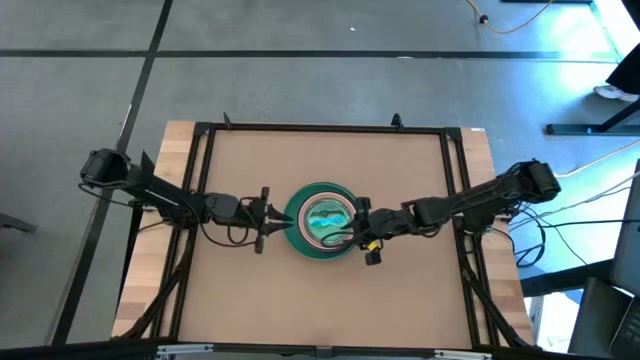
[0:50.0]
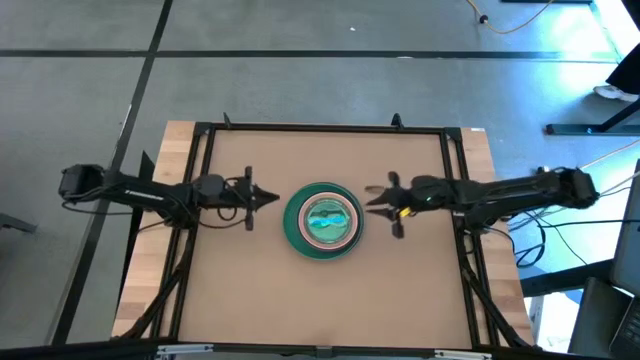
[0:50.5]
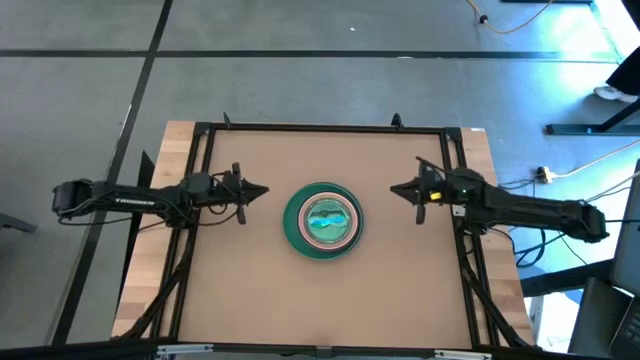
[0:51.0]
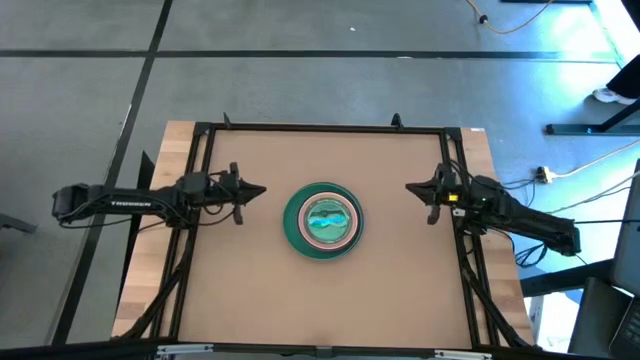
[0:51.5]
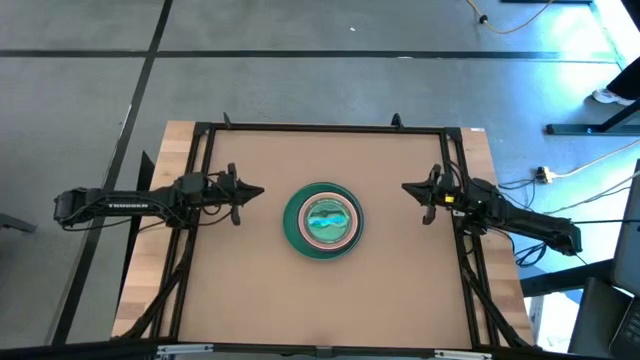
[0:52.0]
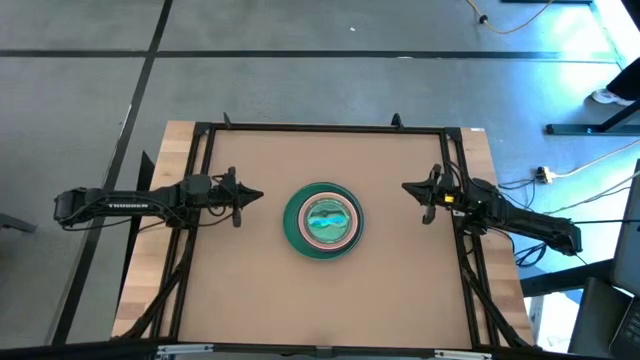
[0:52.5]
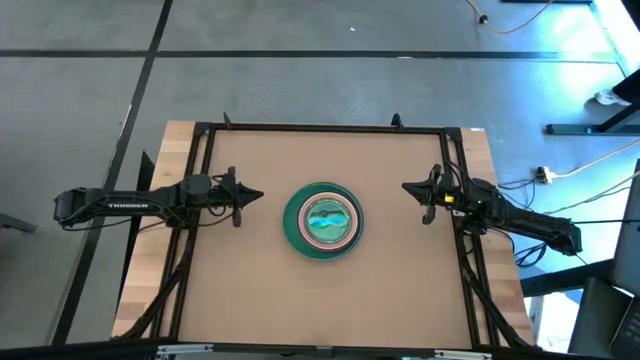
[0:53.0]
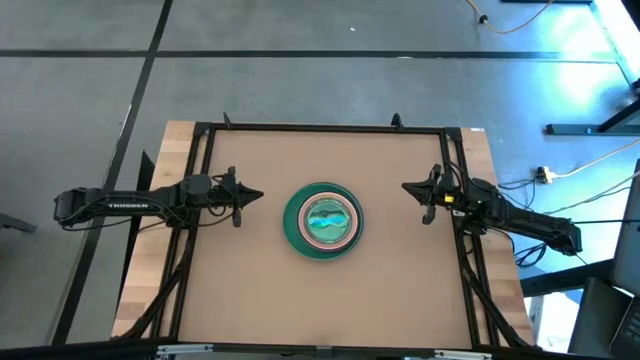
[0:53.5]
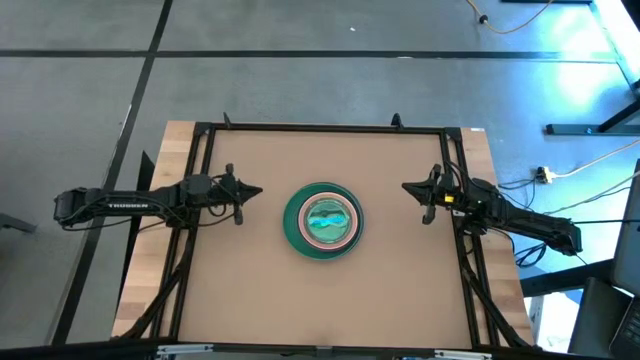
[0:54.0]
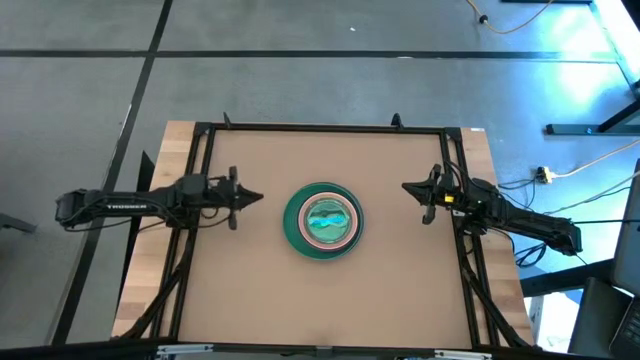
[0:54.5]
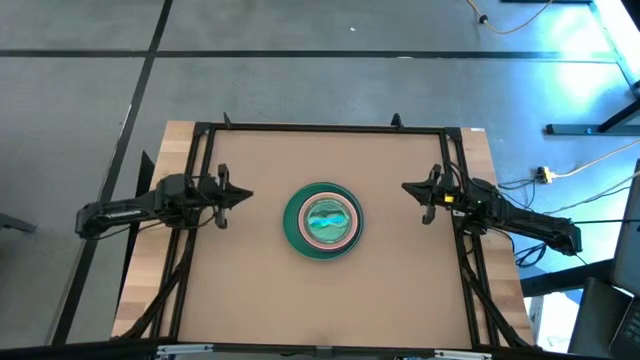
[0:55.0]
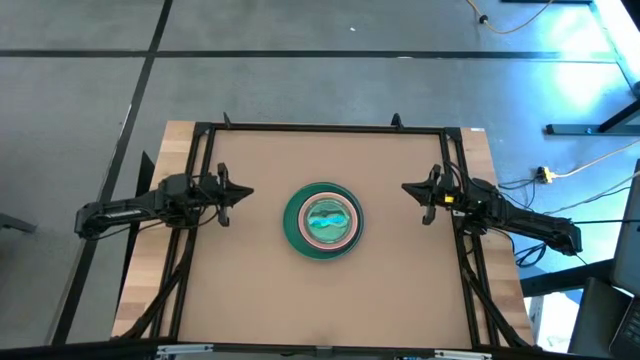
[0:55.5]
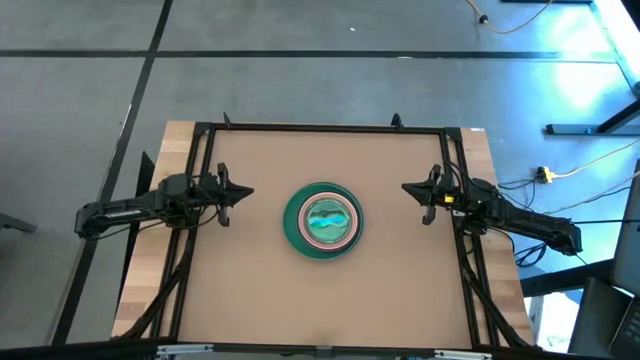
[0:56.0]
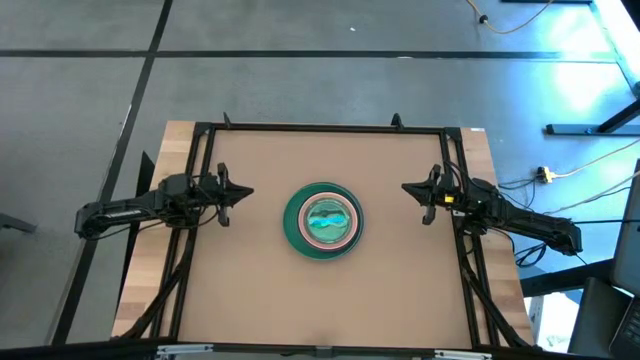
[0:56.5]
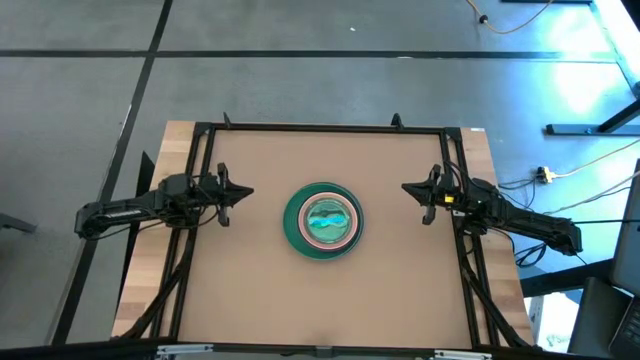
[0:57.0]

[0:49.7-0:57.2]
Task: Stack plastic plates
Return to Home Position

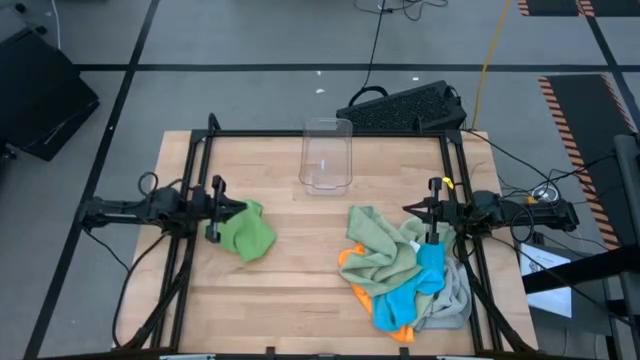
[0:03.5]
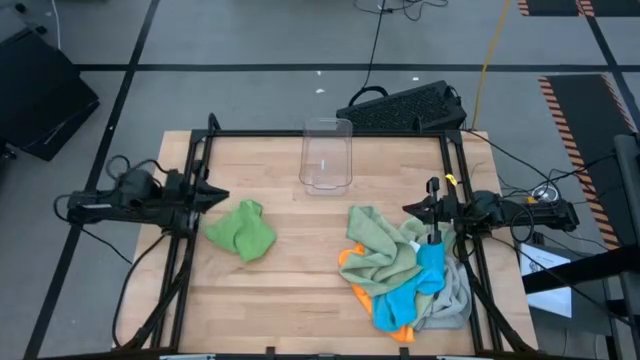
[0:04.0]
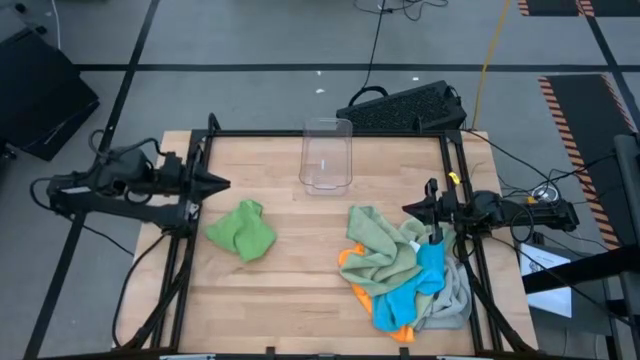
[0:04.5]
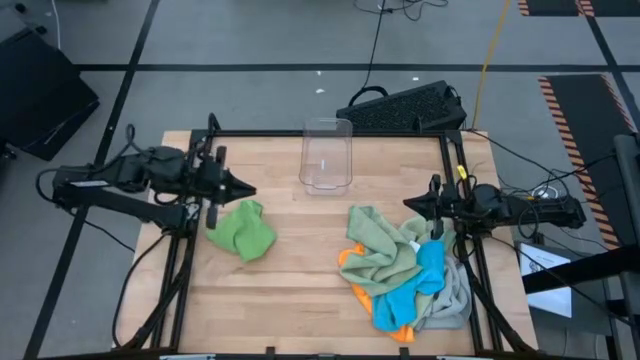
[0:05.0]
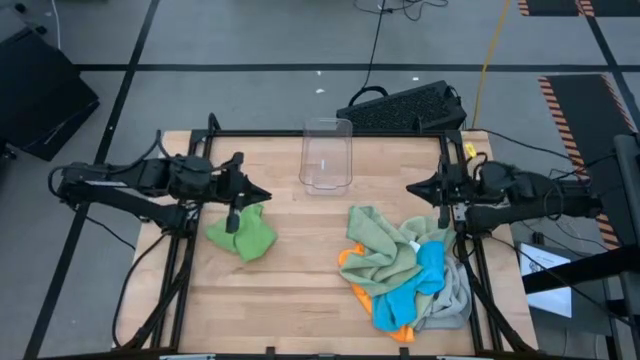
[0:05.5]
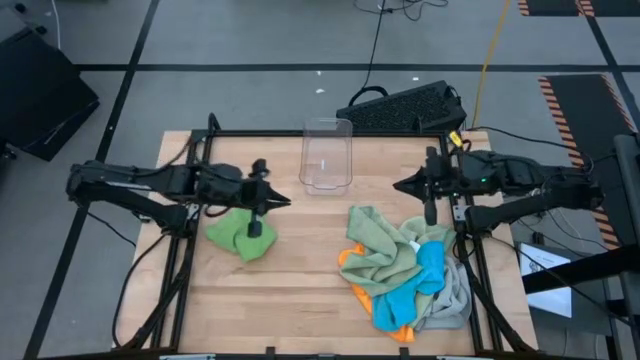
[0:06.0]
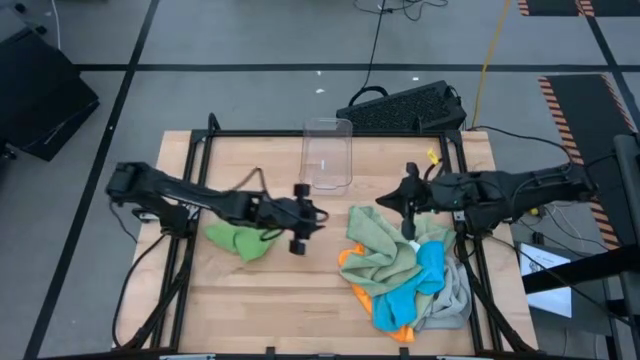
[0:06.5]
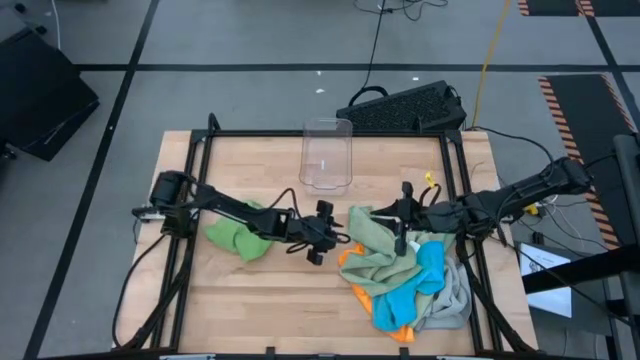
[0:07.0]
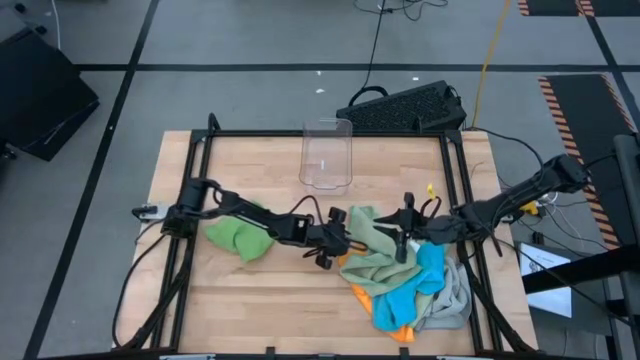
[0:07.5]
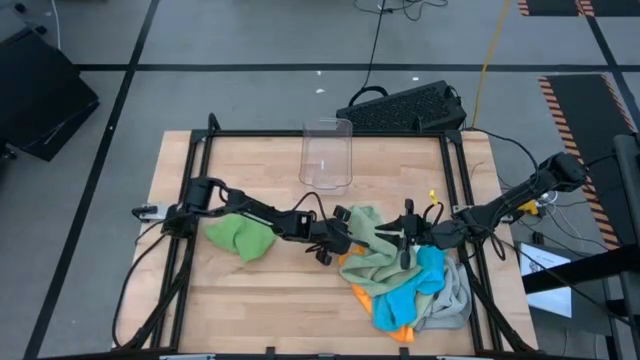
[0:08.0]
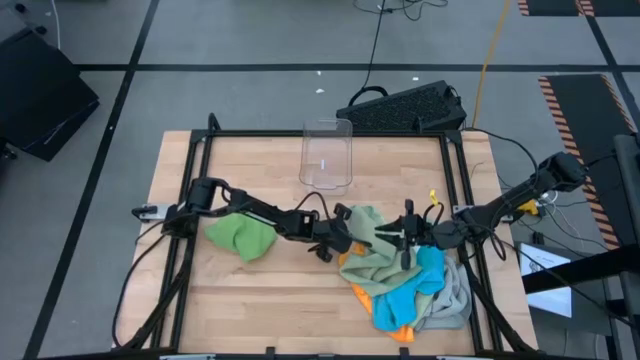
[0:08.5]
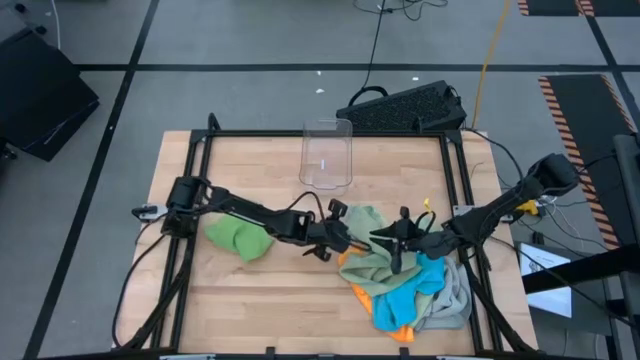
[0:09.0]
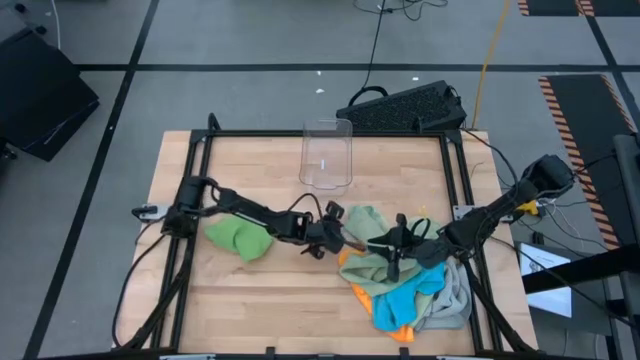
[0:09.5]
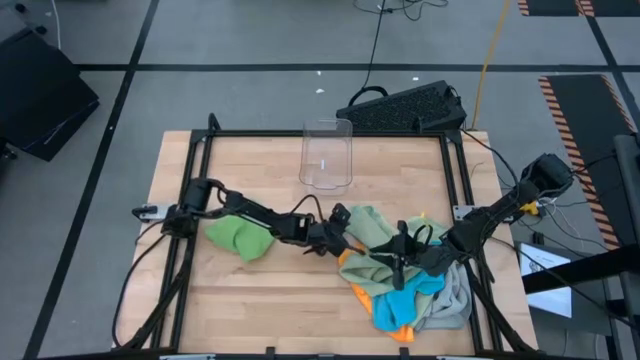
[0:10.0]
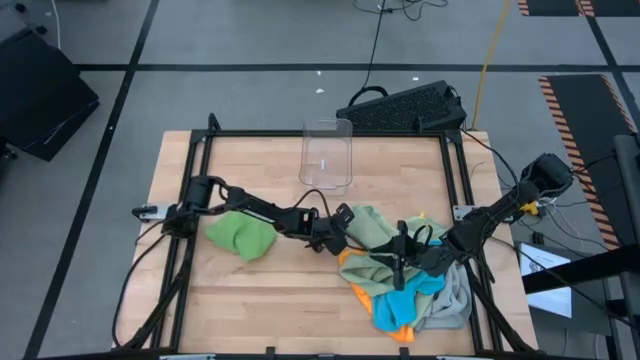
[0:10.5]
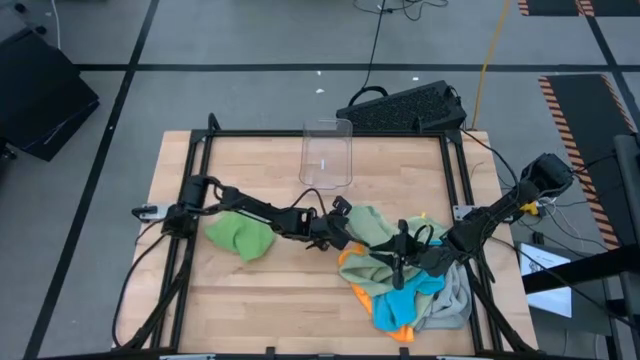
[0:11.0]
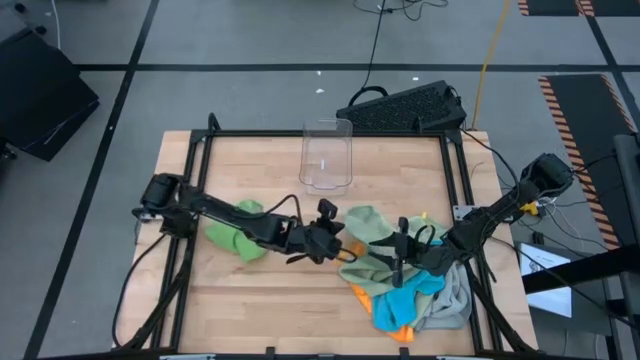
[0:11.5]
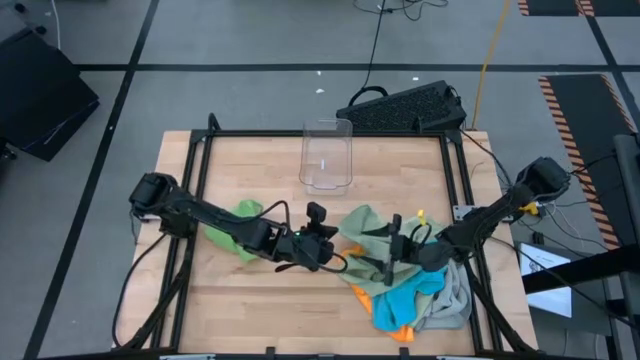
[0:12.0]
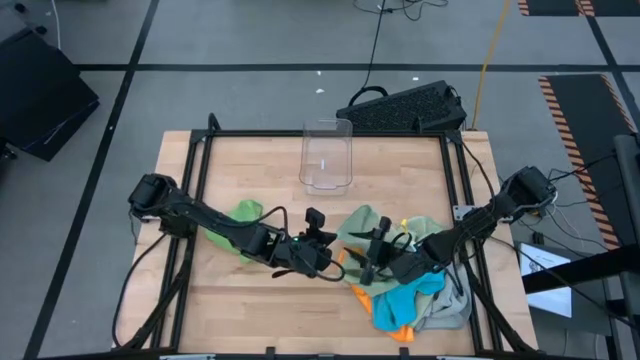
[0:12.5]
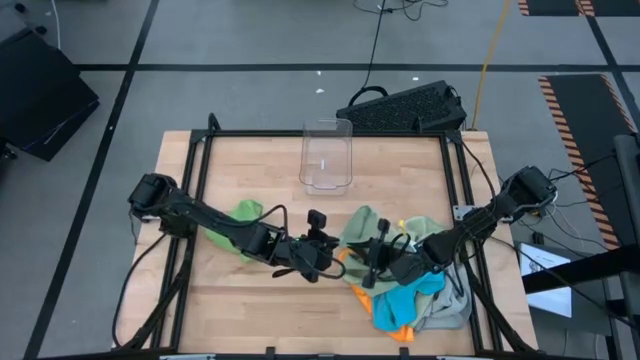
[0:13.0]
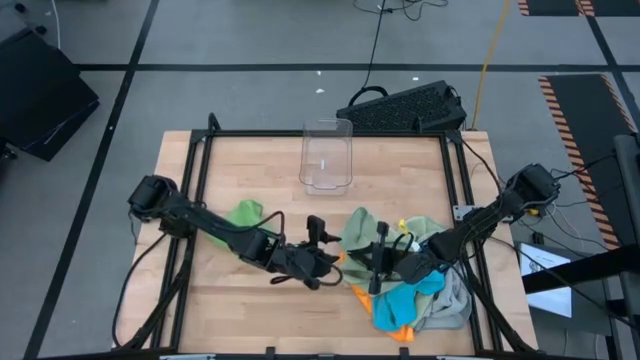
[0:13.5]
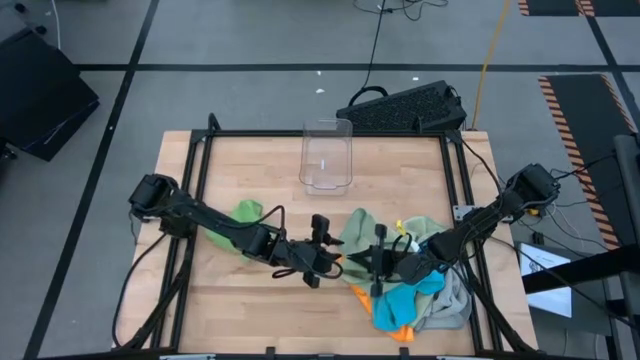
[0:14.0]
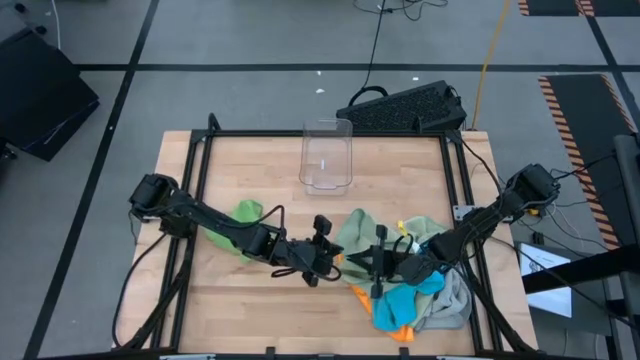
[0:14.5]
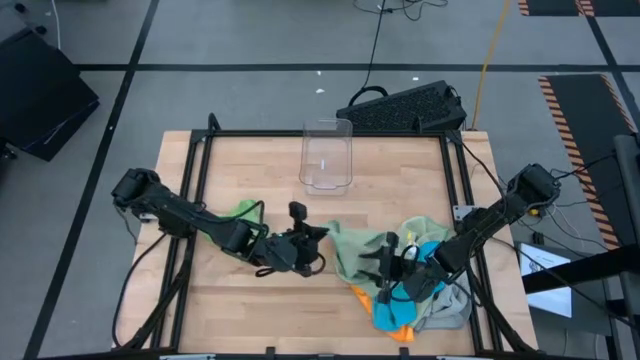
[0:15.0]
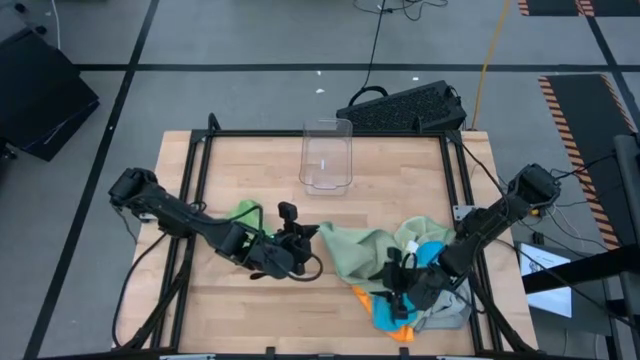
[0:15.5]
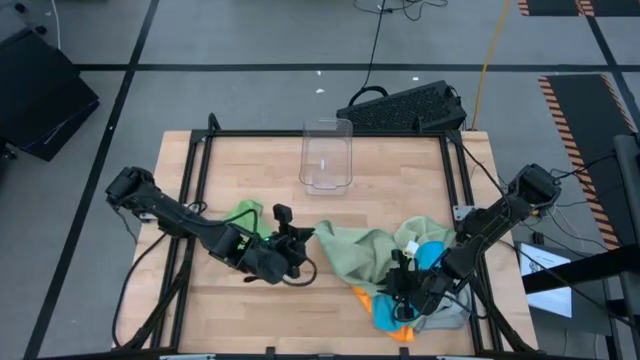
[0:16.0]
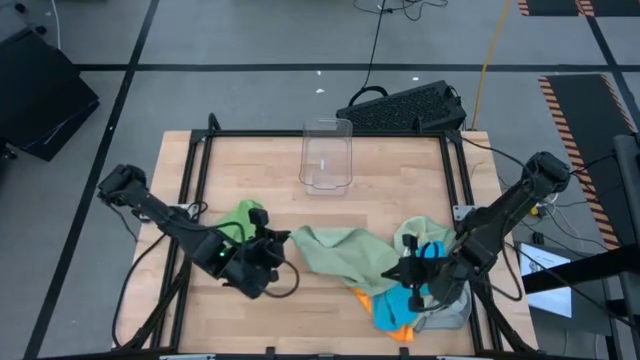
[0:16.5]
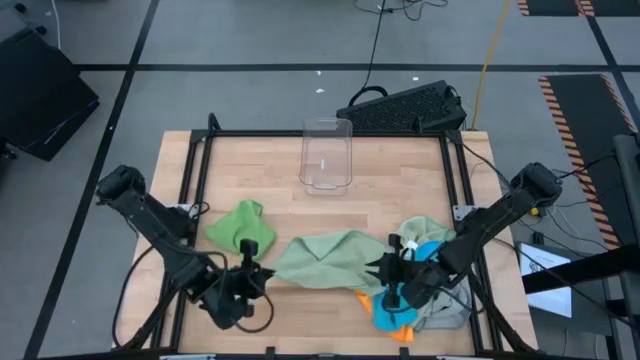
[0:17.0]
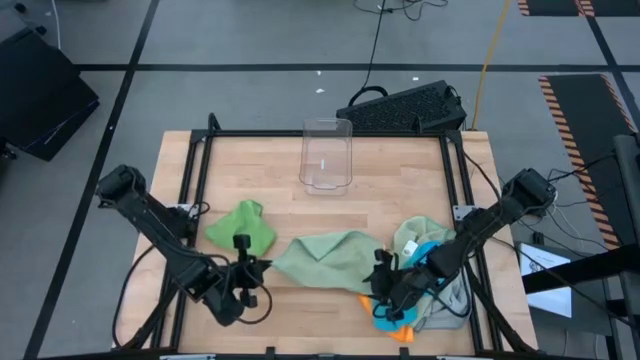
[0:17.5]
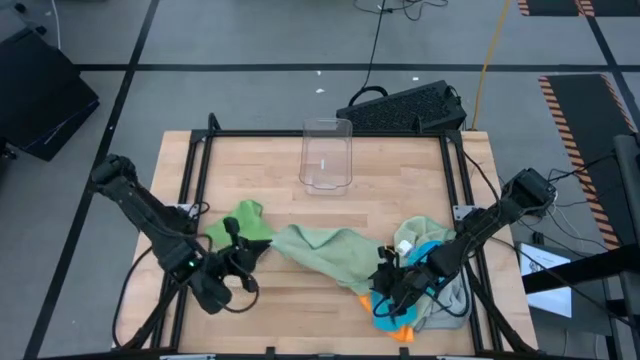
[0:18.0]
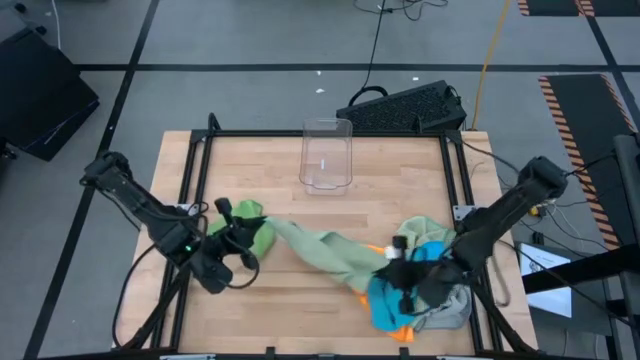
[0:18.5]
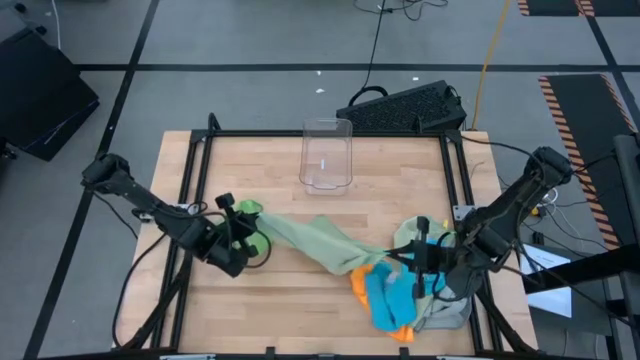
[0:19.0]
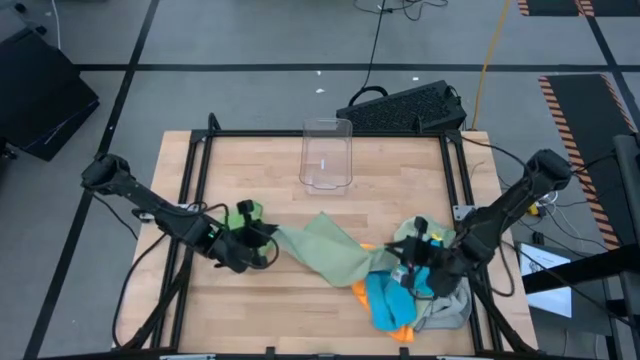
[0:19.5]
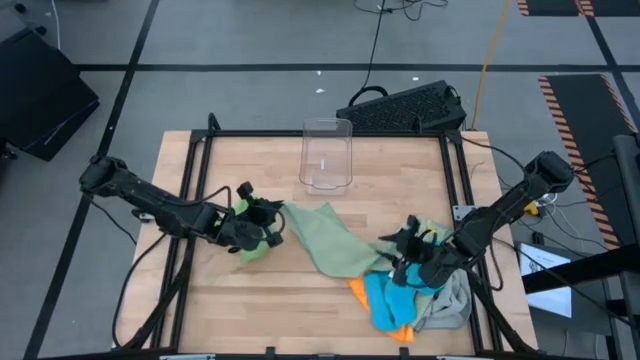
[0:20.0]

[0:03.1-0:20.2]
Task: Fold microfiber towels
Fold the left light green towel
